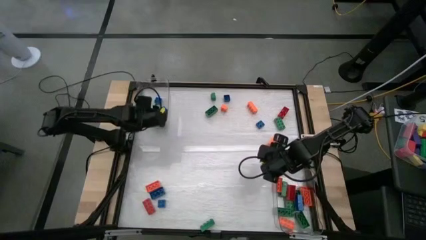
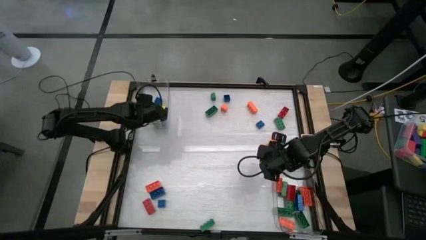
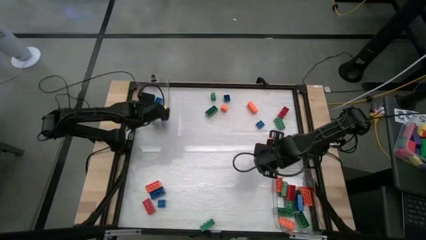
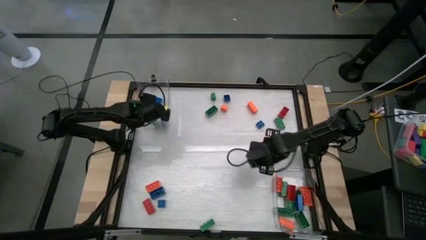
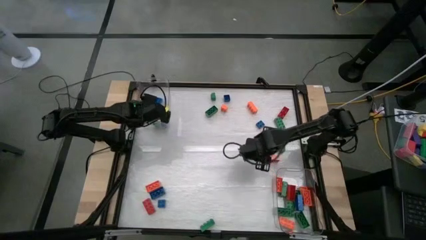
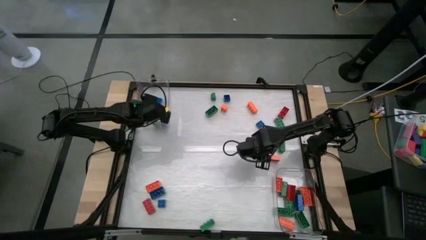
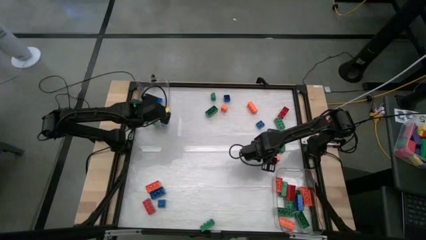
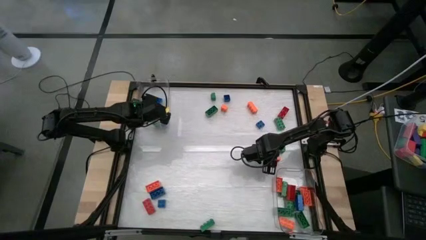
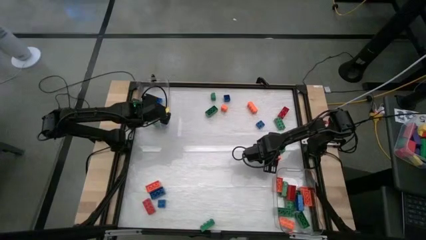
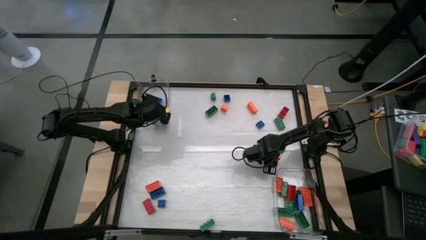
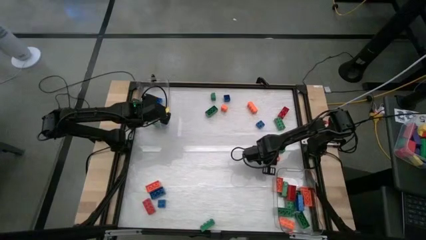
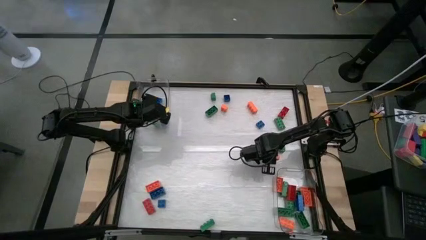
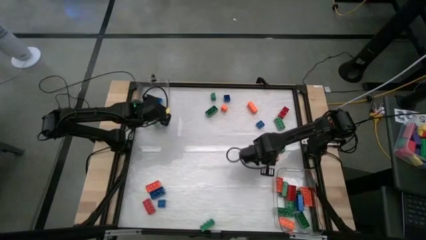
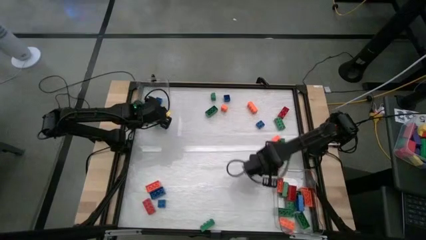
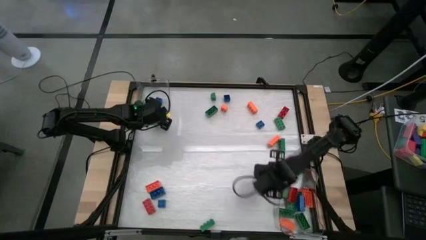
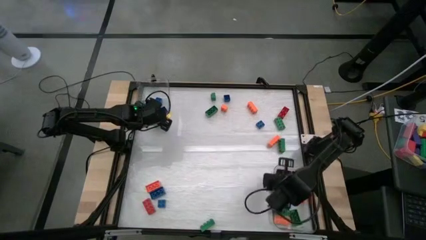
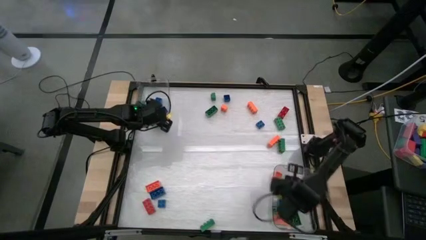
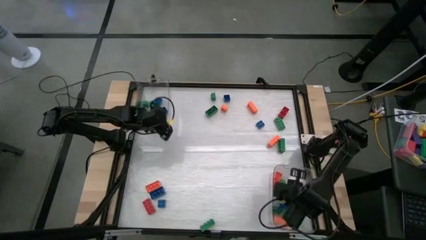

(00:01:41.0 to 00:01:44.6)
Task: Sort blocks by size
Put the 8 stud orange game piece into the bottom transparent bin

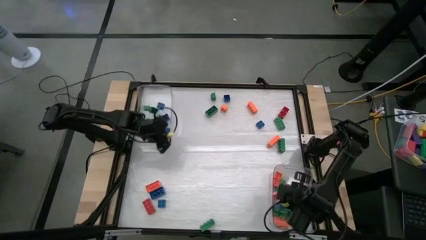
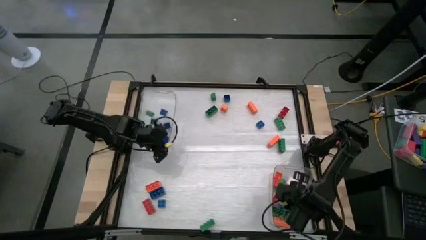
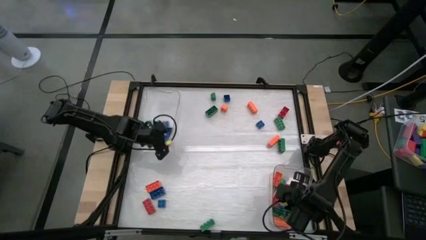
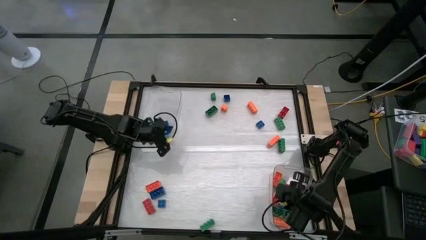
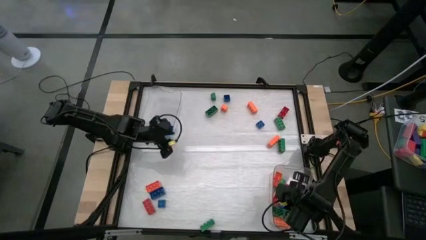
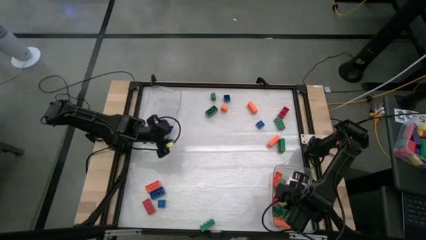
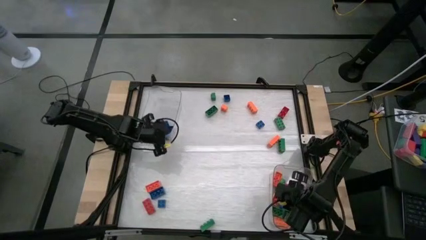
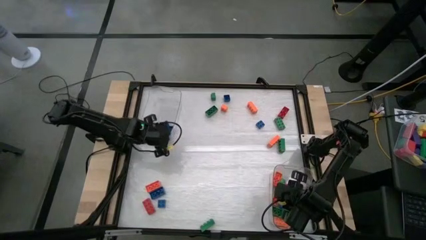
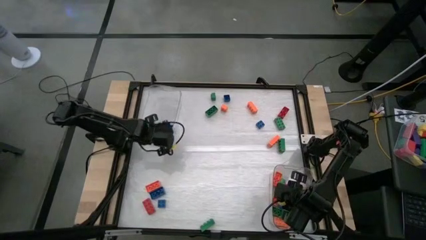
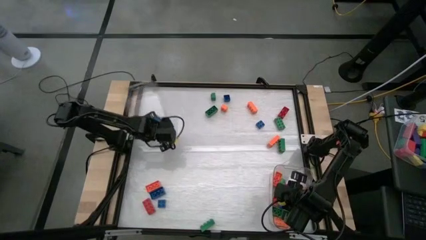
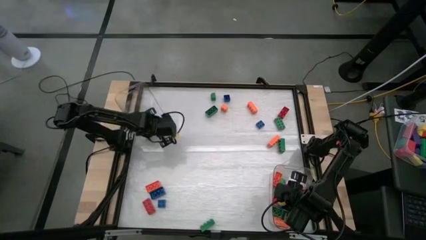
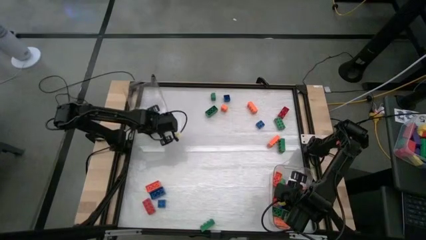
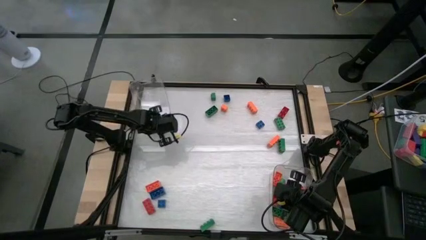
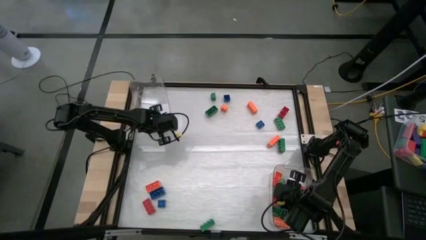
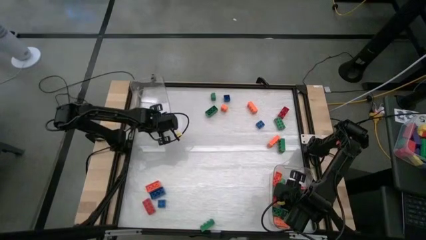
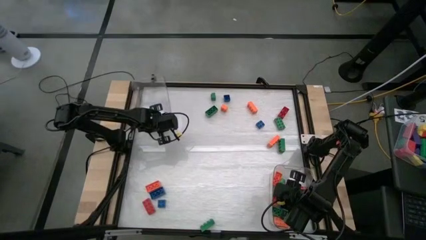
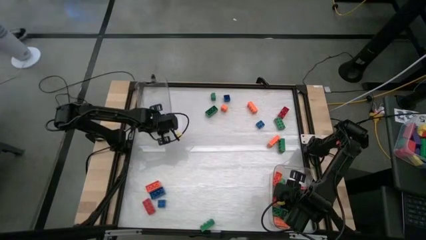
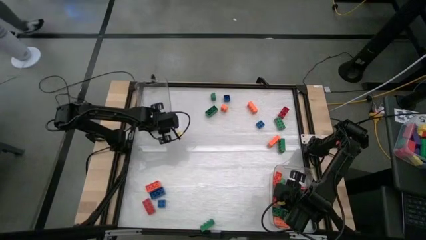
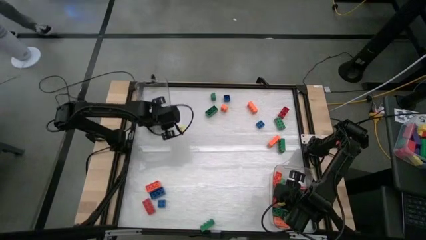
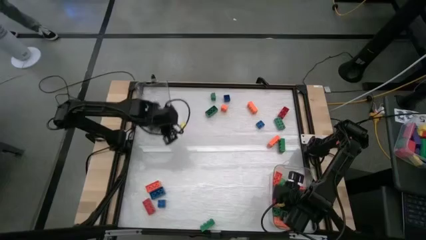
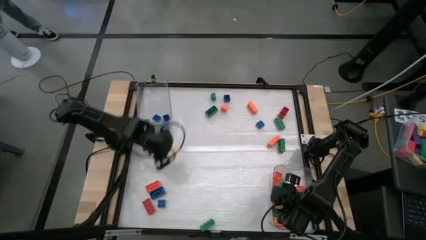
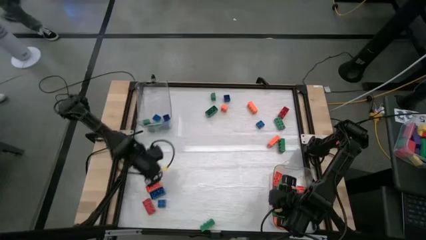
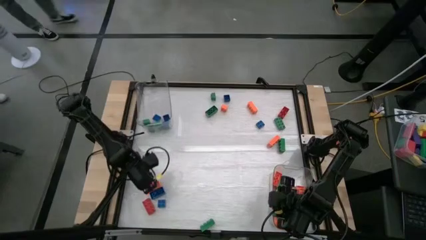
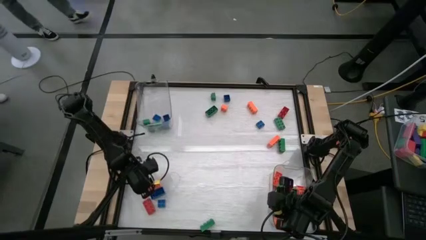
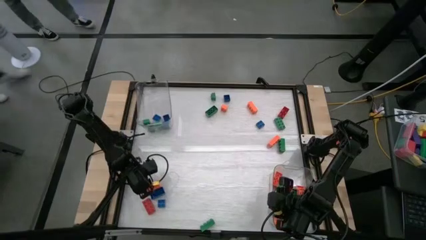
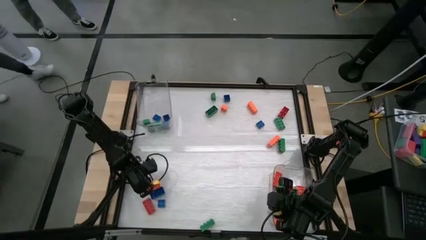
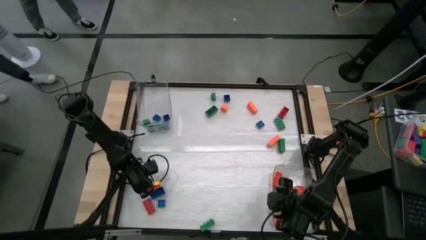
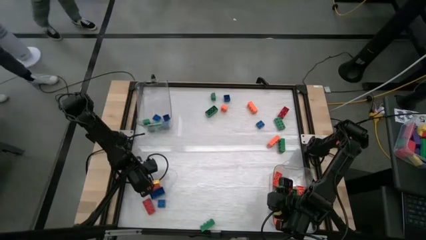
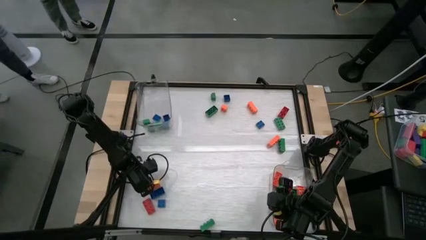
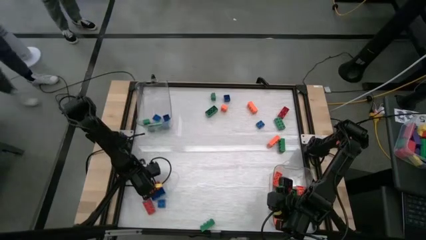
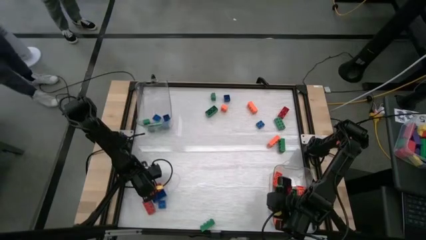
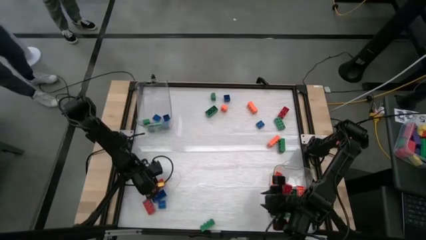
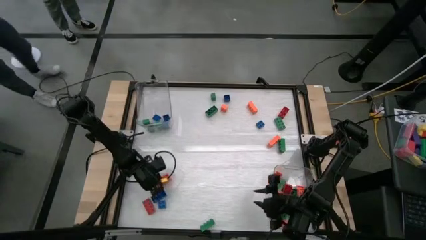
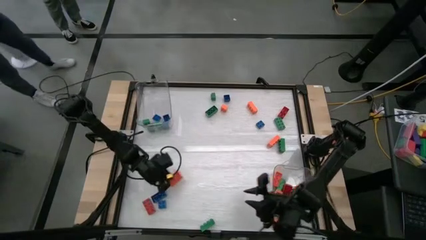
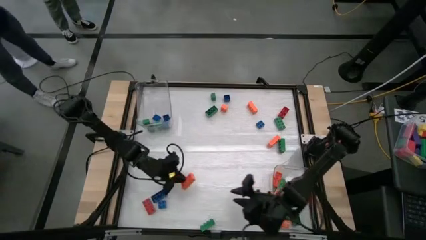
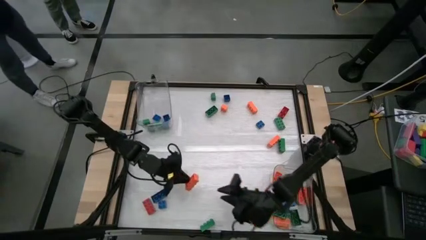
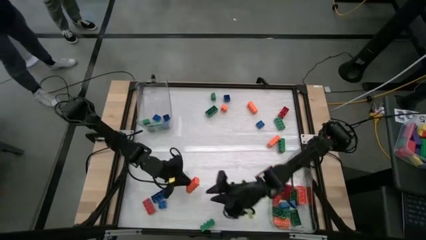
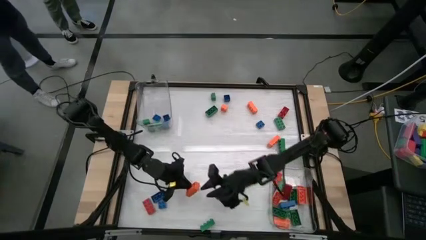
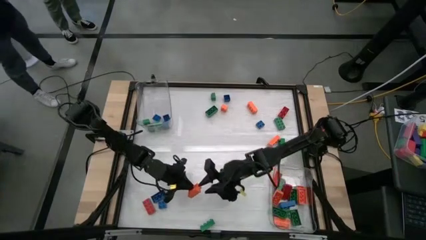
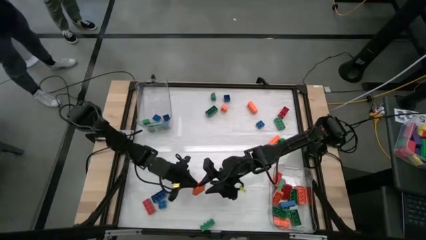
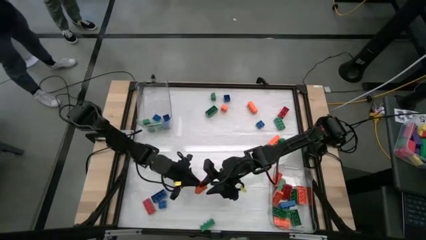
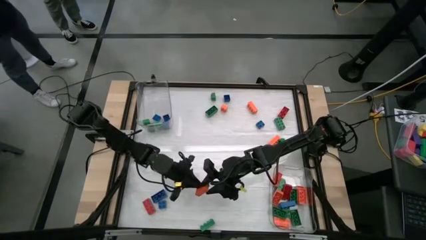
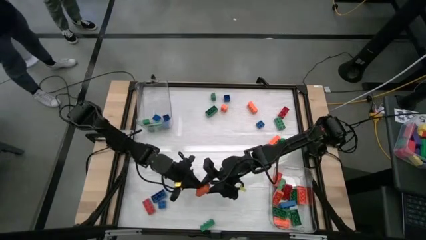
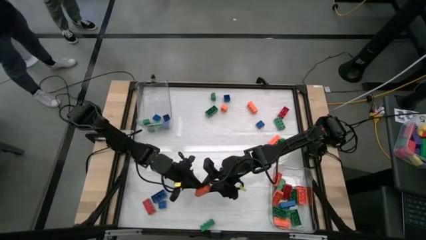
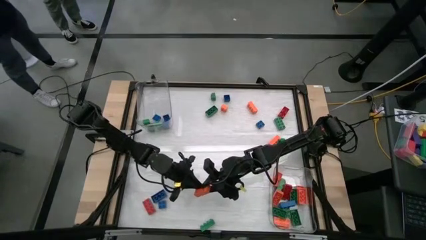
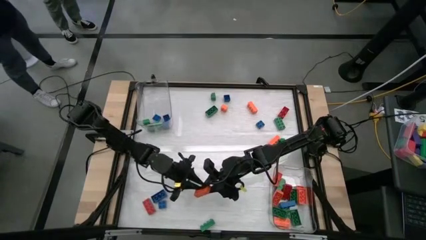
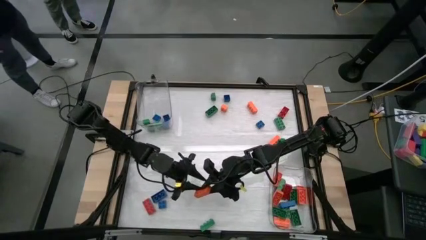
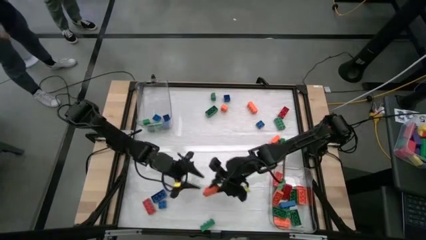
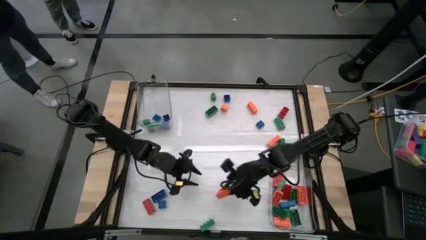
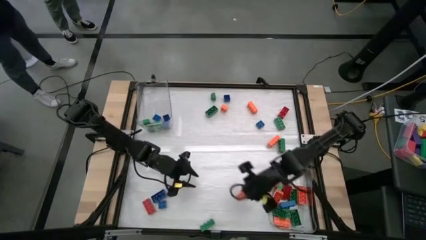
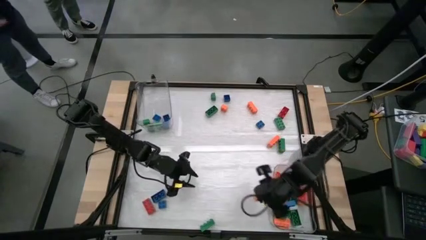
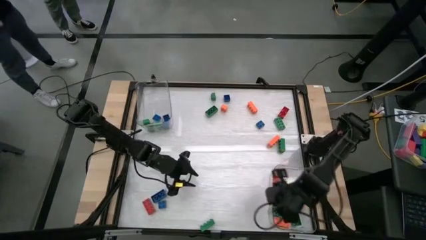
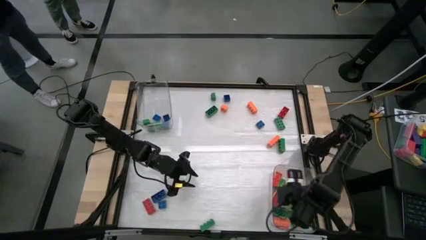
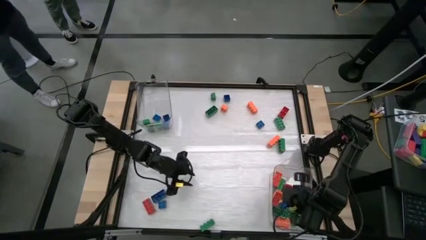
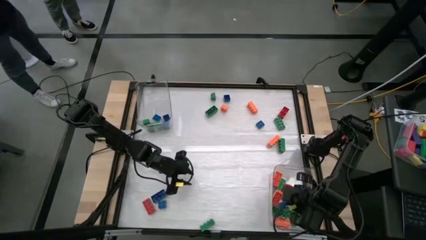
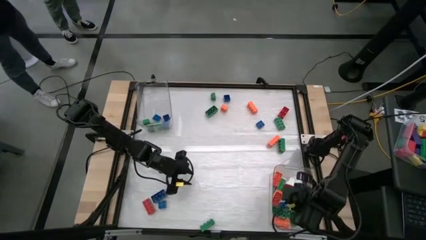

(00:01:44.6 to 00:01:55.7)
Put the 8 stud orange game piece into the bottom transparent bin

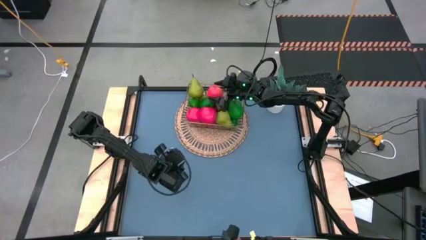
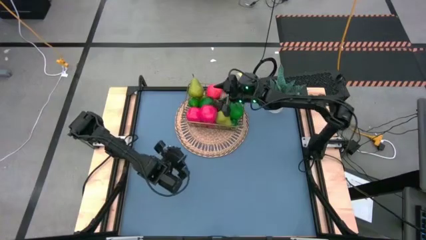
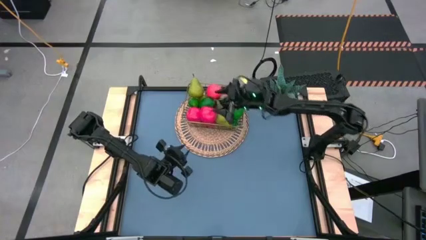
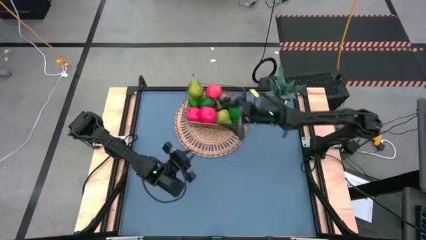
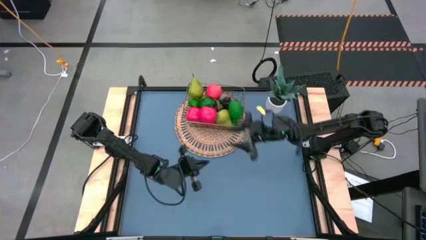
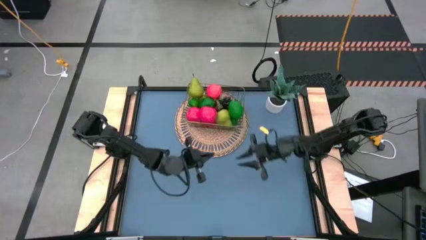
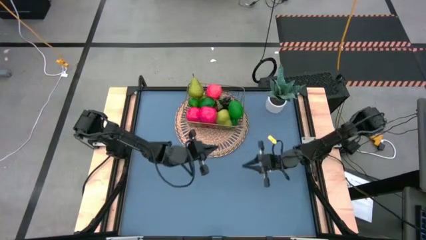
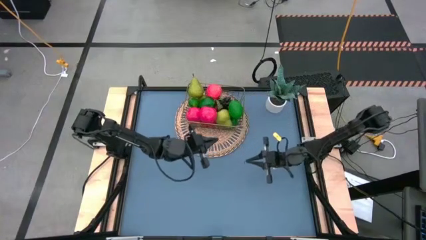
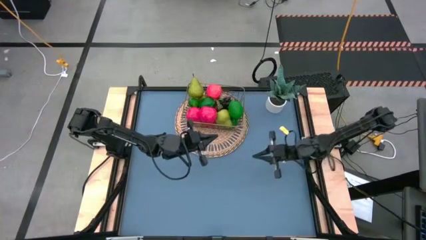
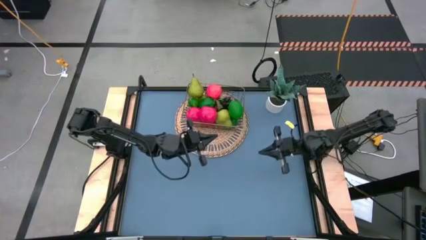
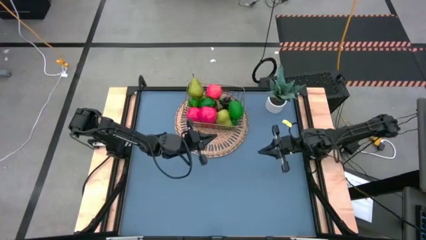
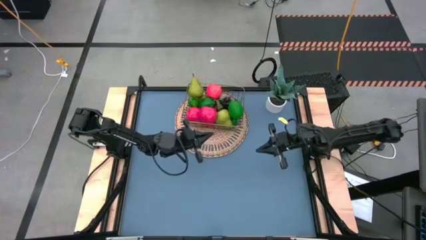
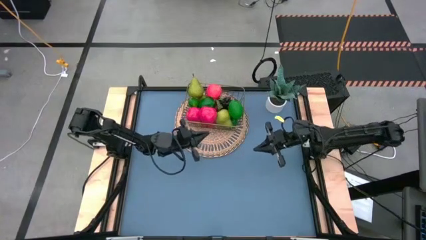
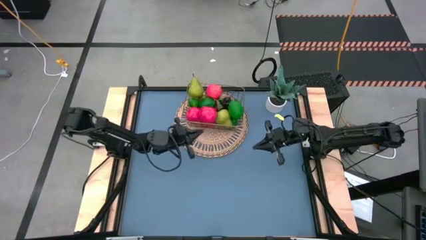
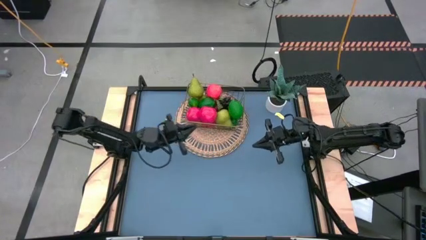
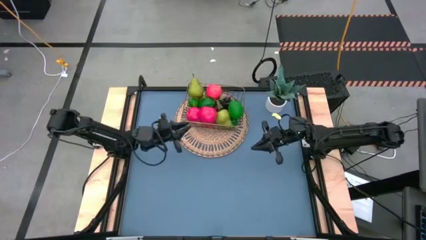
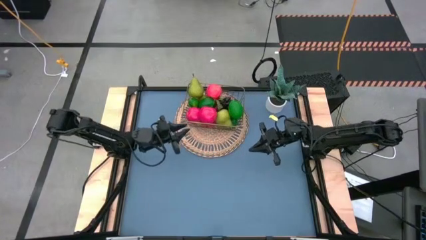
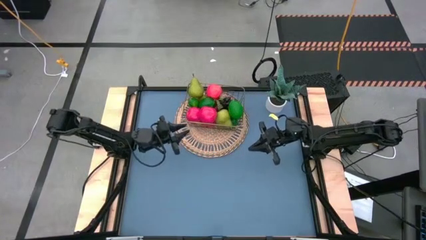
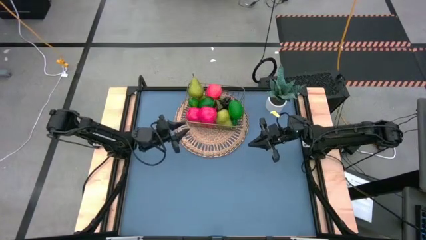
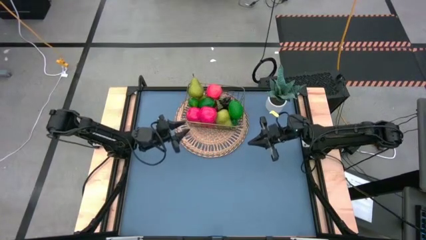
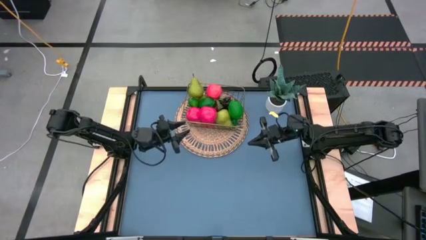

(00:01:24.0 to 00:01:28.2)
Task: Build produce basket
Return to Home Position
